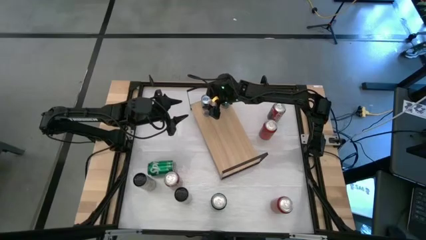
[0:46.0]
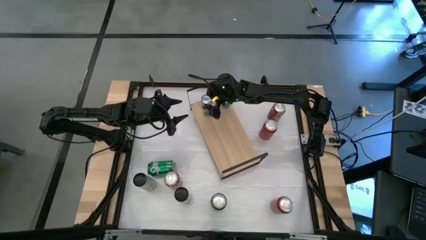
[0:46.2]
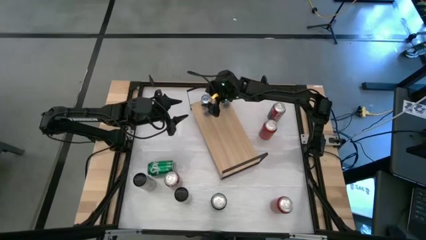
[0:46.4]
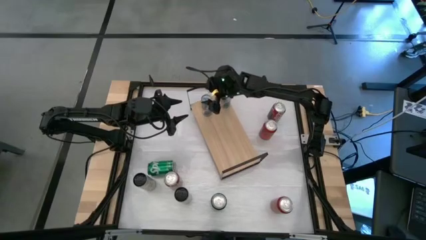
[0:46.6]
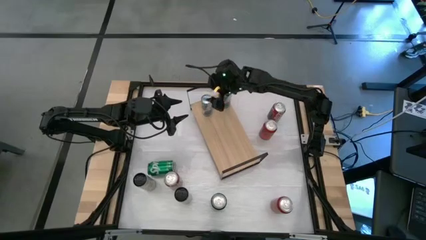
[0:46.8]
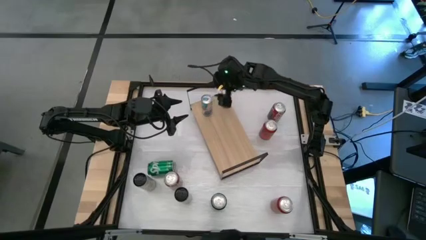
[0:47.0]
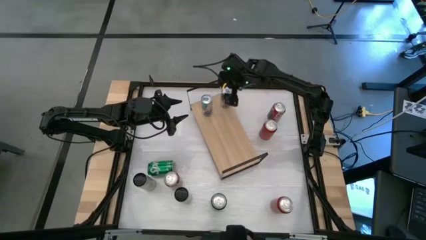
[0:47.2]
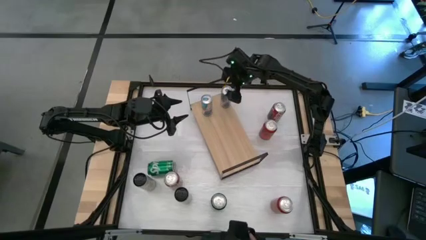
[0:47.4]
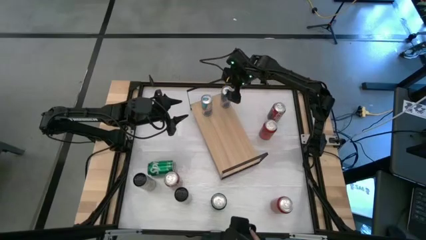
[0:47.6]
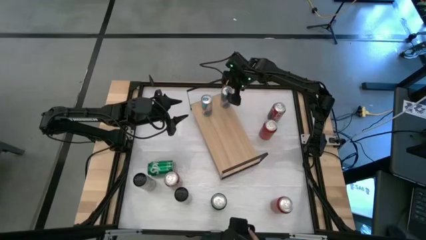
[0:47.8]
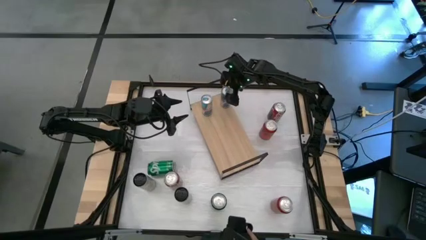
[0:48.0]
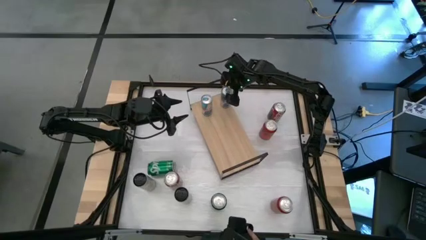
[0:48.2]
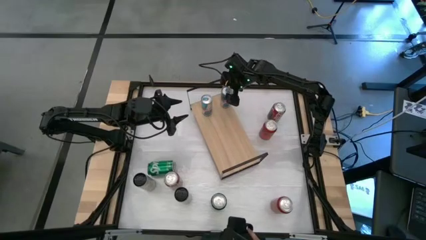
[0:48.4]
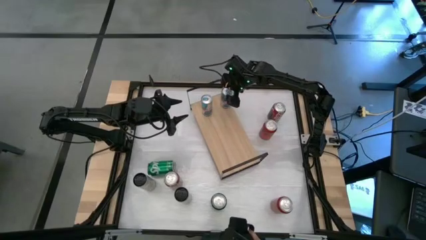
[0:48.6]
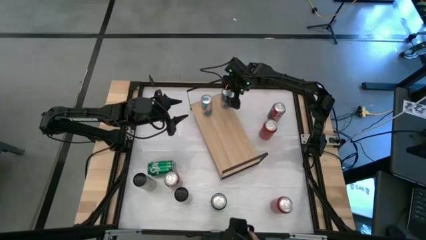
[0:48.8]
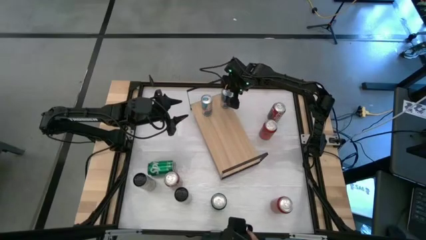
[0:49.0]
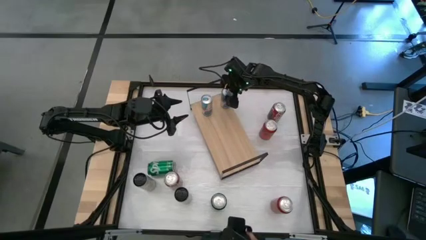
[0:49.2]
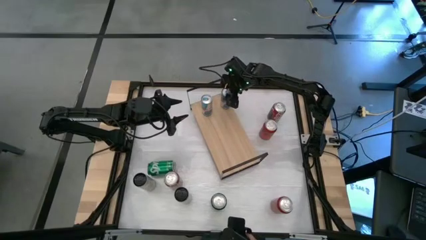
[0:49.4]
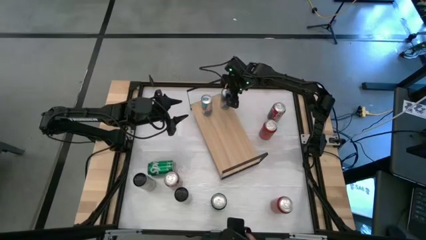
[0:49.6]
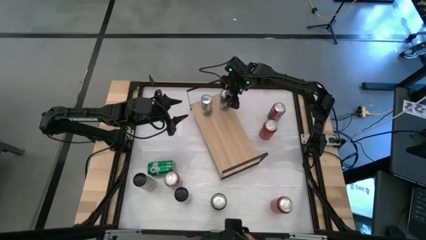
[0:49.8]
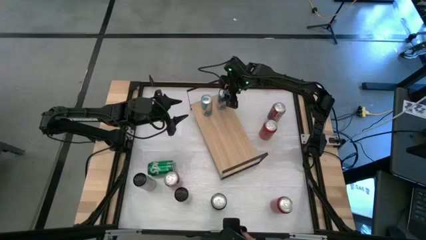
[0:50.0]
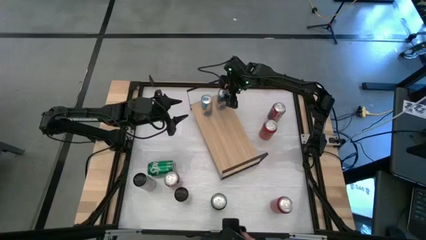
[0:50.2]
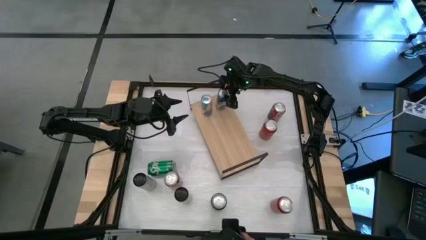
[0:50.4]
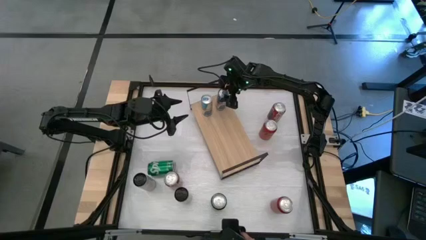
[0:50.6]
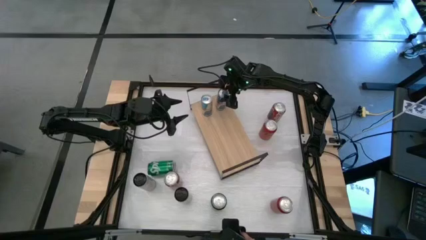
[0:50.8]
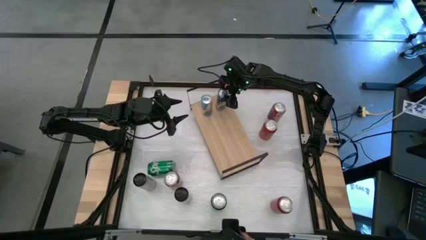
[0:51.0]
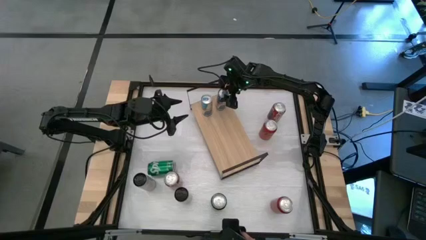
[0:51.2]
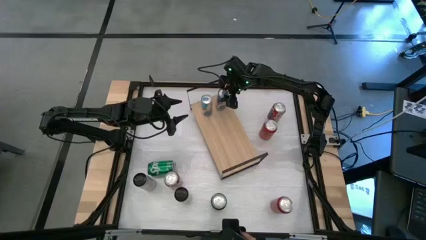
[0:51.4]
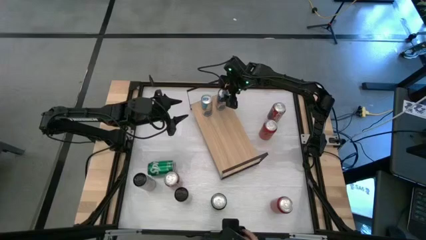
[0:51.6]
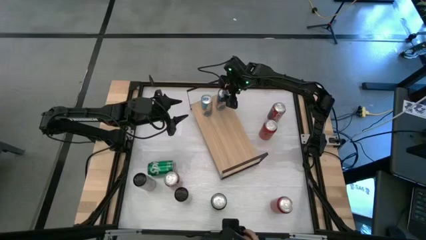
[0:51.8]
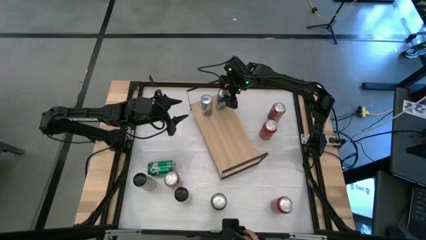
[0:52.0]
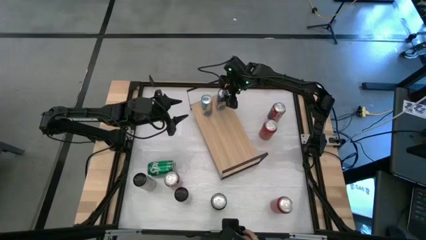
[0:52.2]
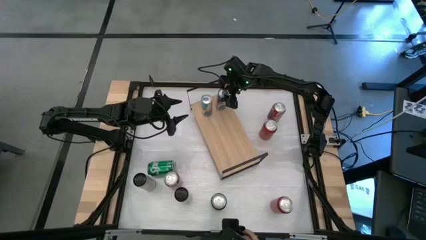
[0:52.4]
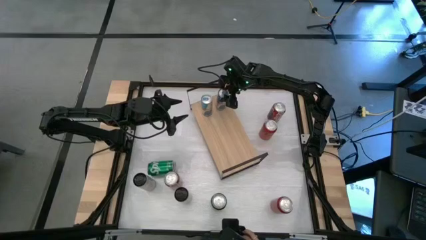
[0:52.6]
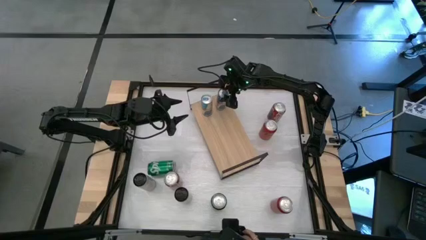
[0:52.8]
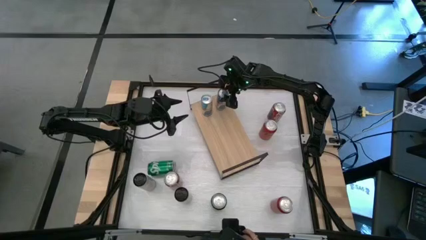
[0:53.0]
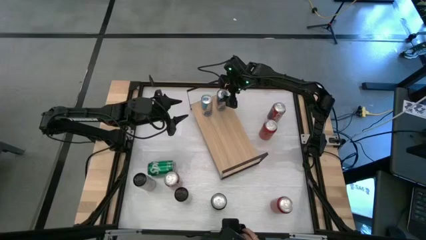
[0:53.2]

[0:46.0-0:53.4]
Task: Place canned beverage on shelf
Adjust the blue soda can on the shelf

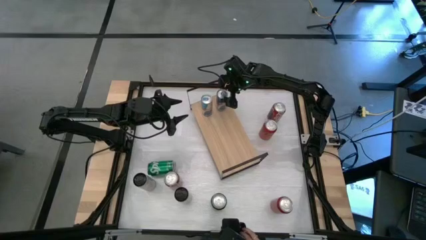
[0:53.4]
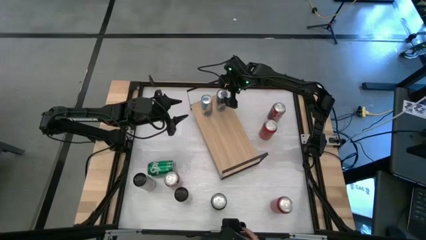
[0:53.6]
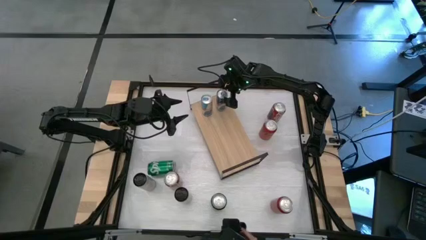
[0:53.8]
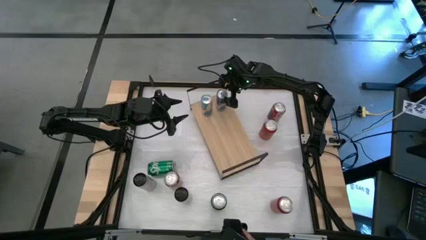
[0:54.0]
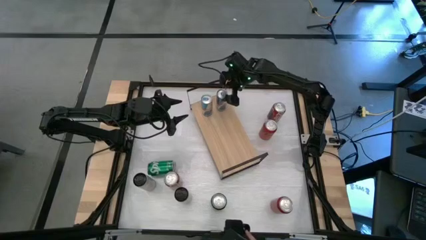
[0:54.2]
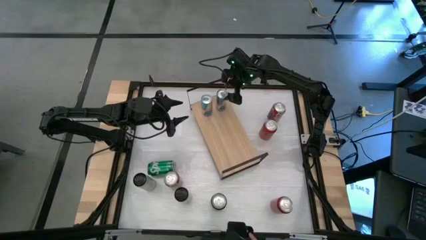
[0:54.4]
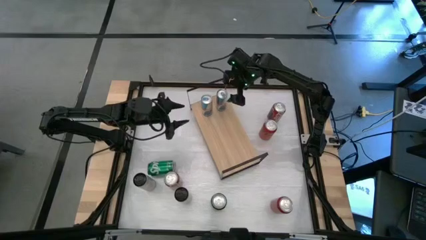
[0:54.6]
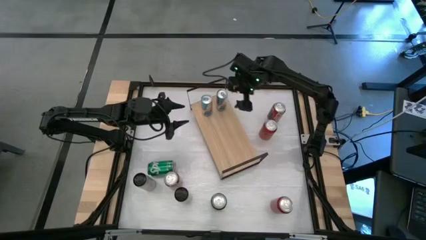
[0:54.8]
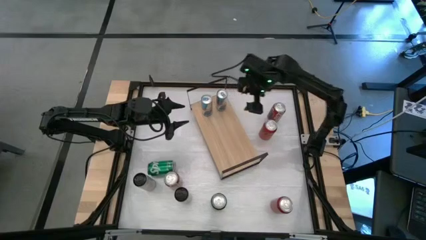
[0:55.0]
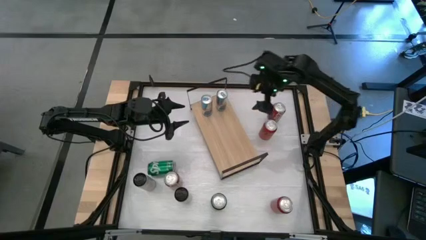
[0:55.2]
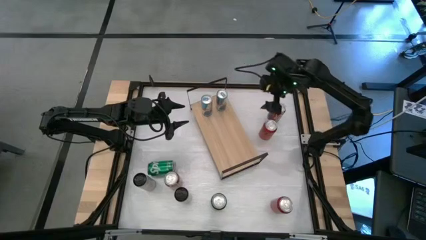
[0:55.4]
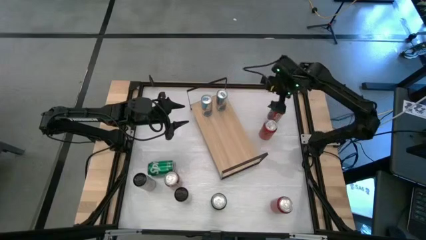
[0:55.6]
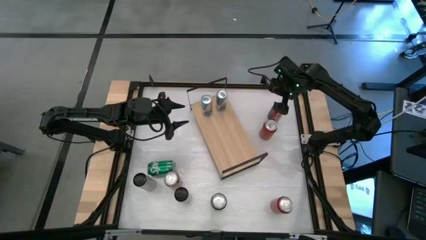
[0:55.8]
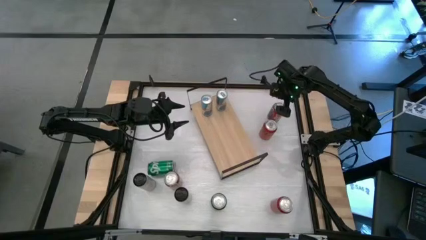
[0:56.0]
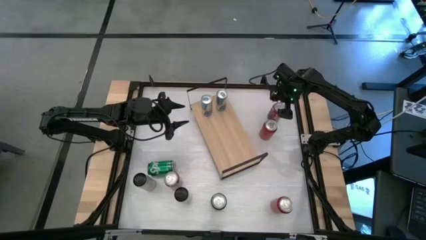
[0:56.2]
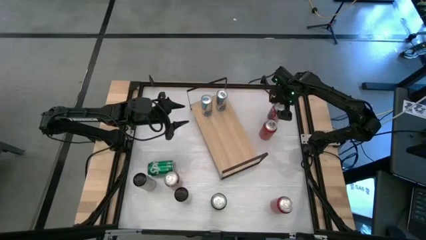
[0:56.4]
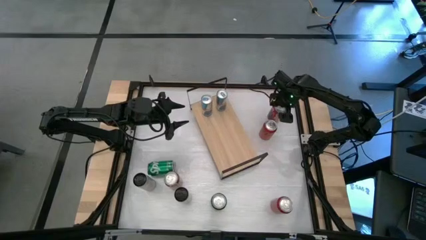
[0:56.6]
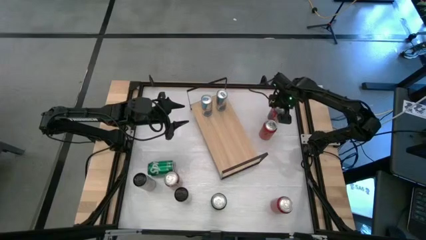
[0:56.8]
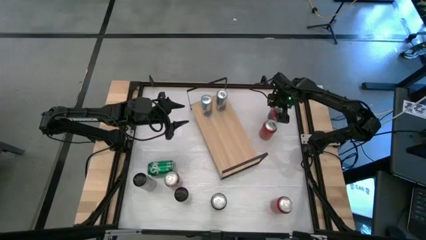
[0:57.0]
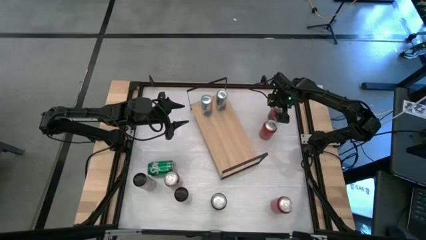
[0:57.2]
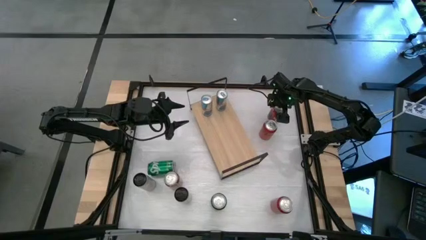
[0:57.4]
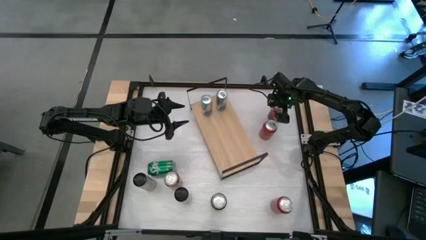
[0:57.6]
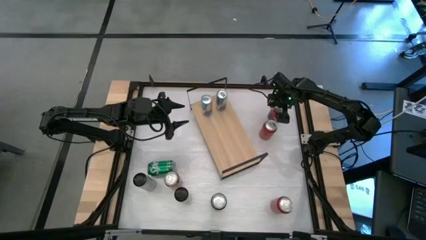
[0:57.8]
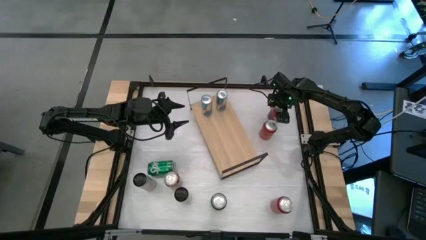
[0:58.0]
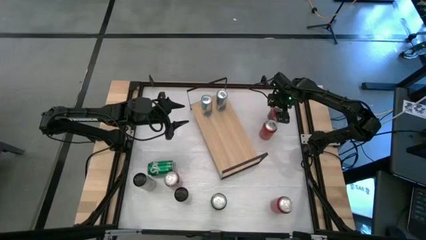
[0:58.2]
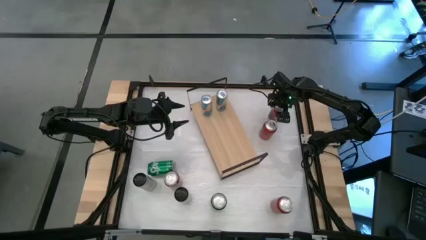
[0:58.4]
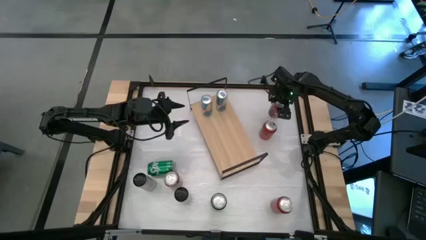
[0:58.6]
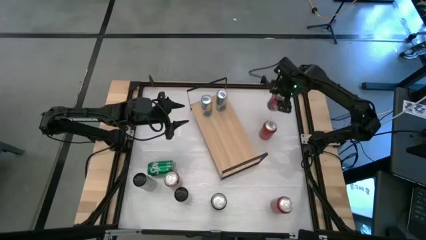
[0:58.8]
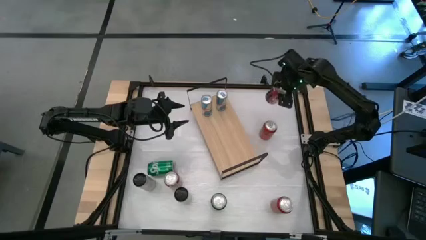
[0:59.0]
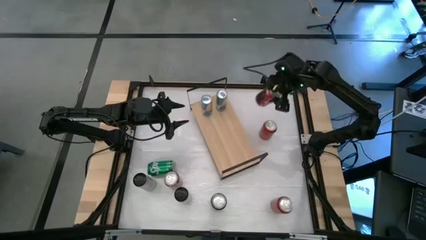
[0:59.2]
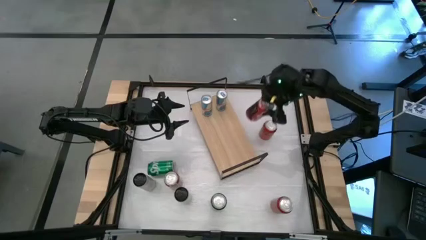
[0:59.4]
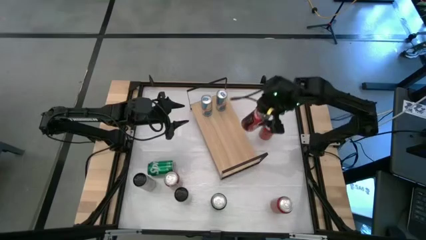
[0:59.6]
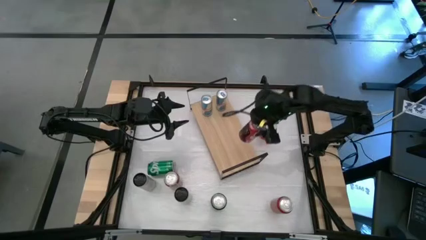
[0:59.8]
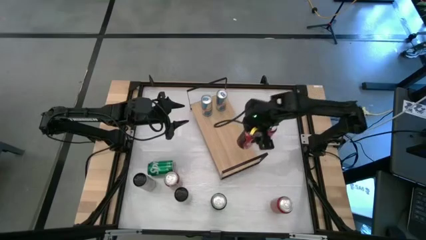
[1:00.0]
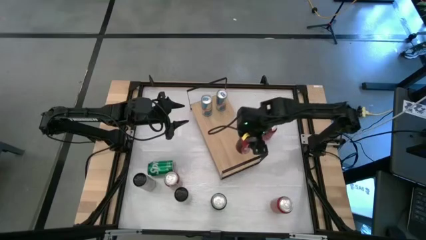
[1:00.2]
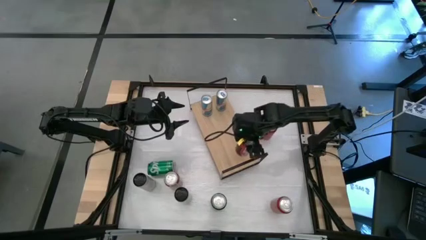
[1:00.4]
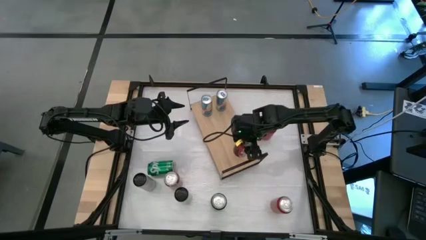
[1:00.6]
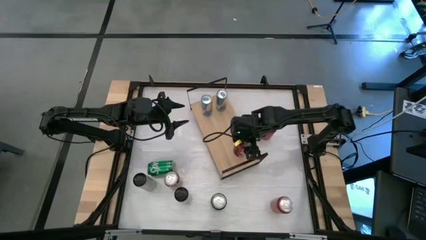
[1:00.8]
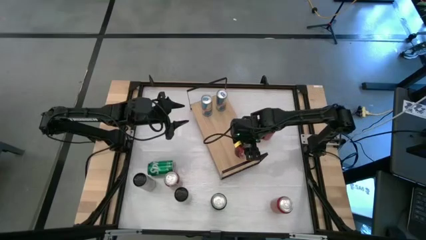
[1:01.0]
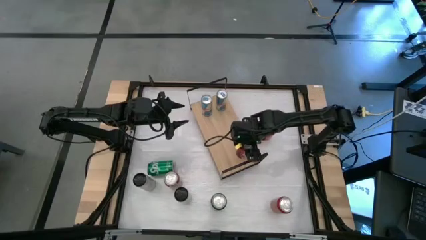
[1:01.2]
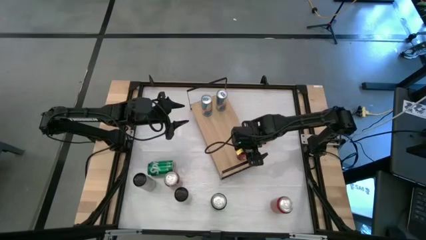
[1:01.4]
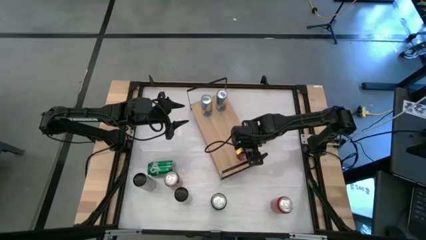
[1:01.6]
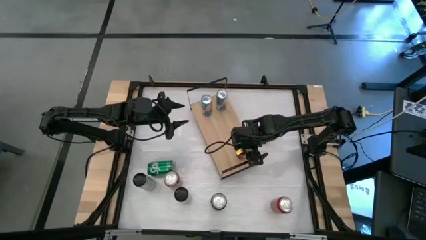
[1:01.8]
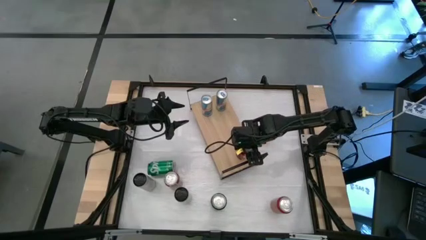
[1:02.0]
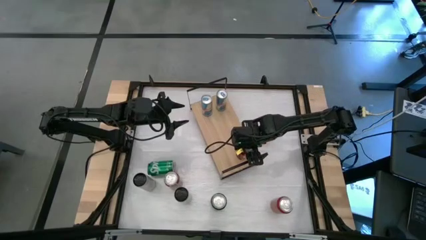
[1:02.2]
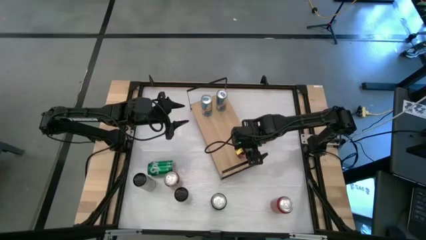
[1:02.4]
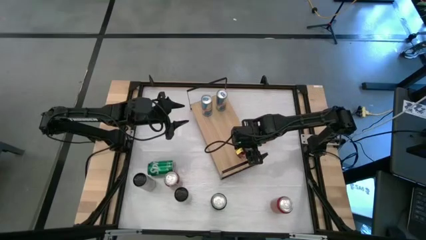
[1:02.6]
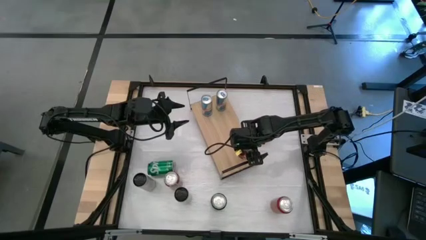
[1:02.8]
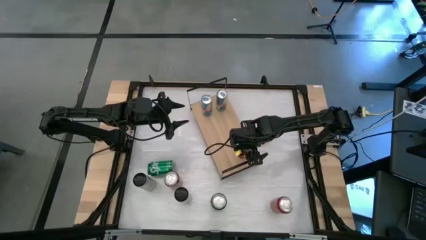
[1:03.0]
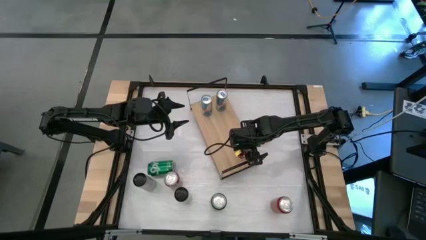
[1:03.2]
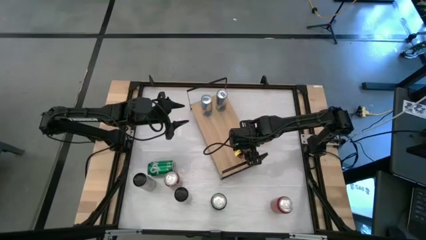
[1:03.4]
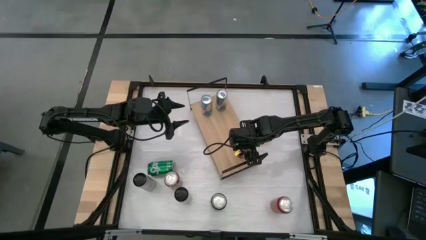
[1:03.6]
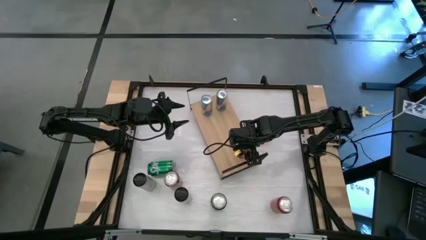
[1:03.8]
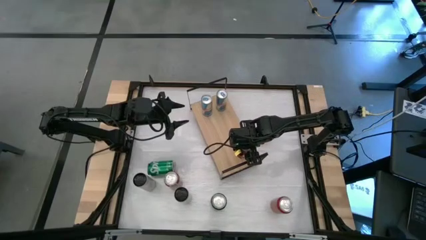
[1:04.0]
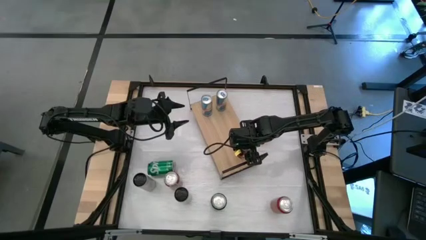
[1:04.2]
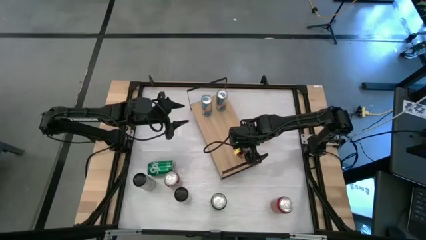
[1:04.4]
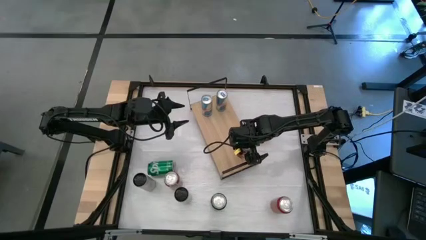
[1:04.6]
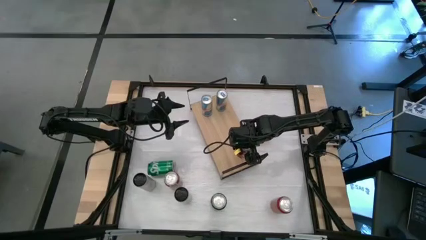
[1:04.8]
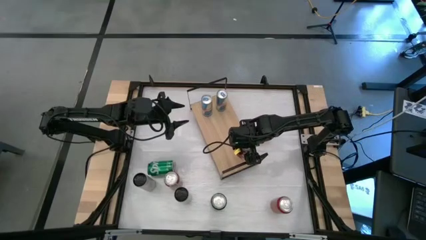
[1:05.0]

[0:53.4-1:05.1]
Put the top red-white soda can on the shelf
